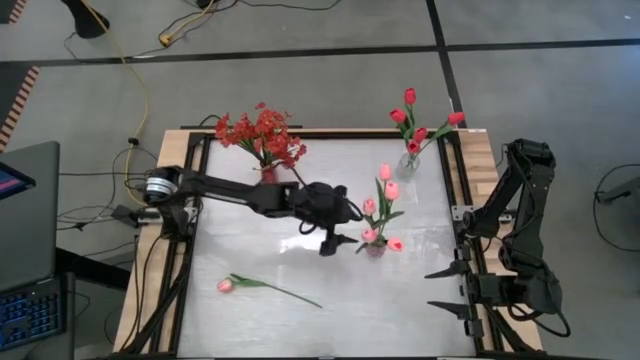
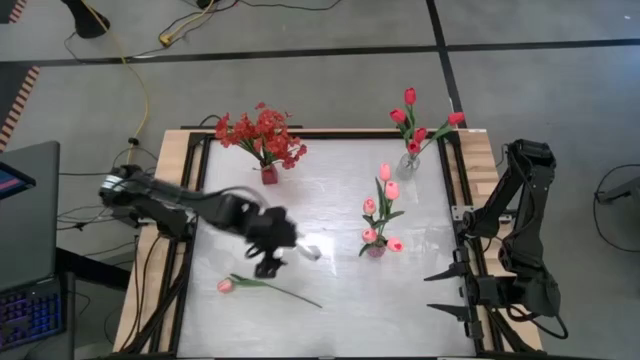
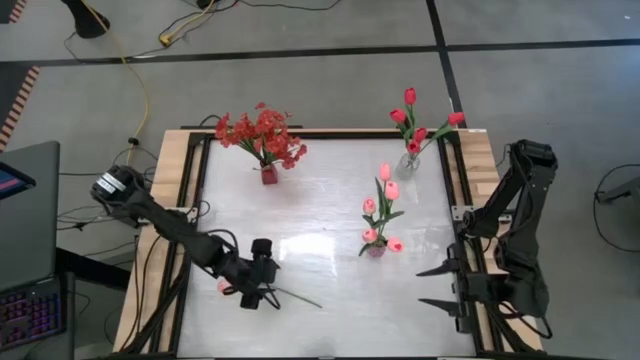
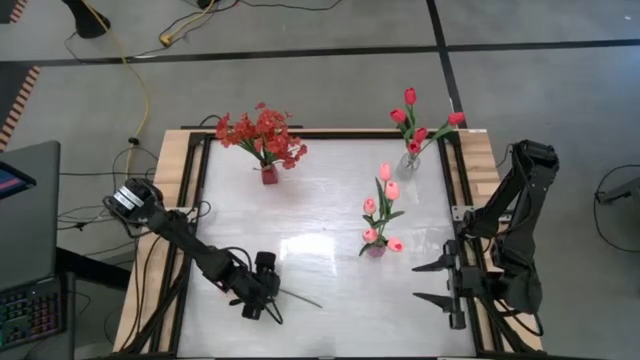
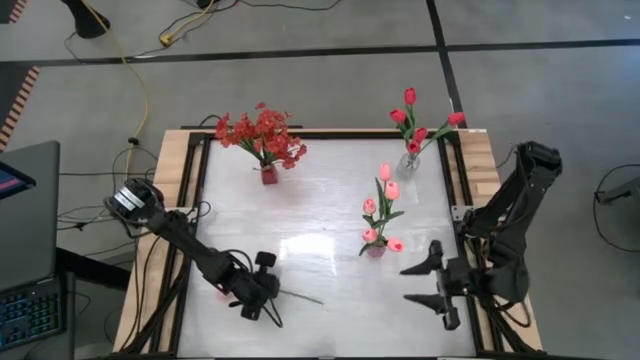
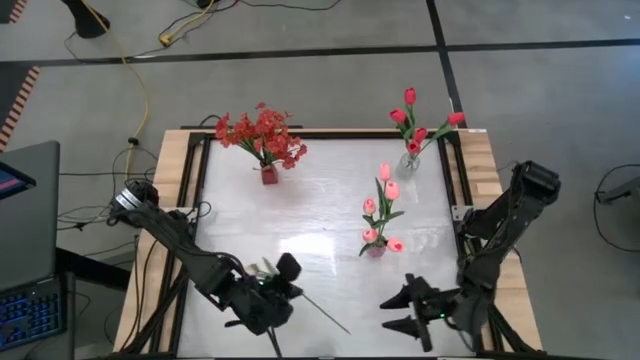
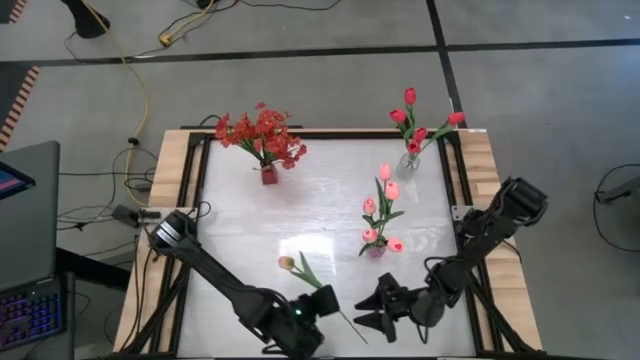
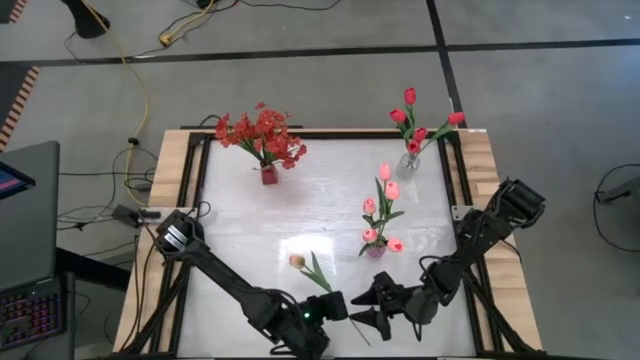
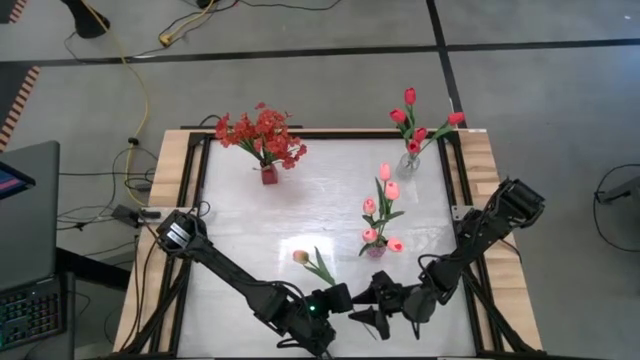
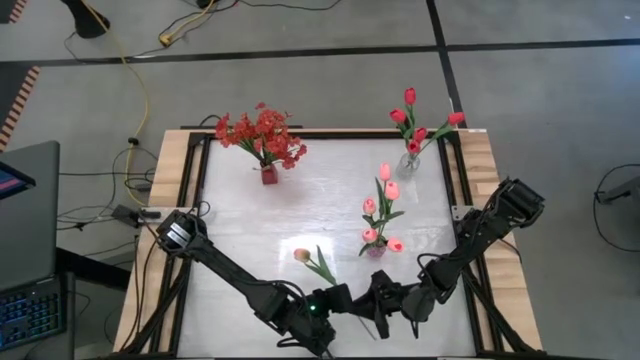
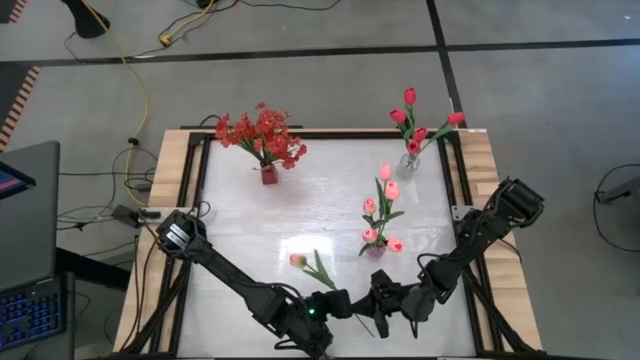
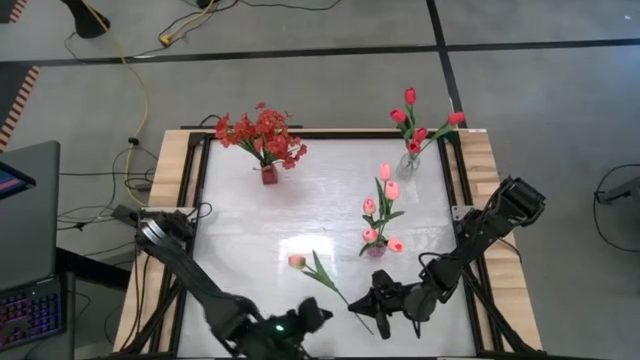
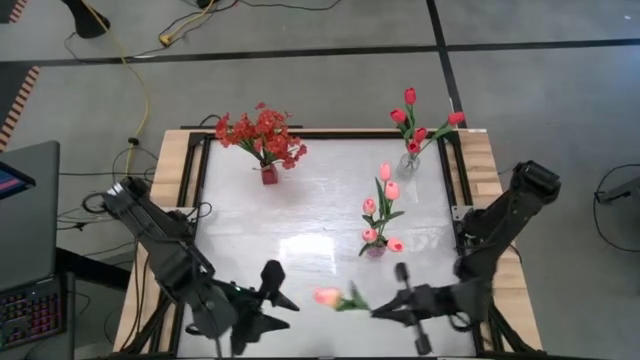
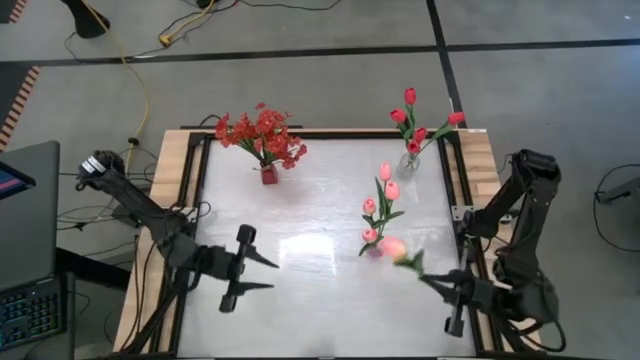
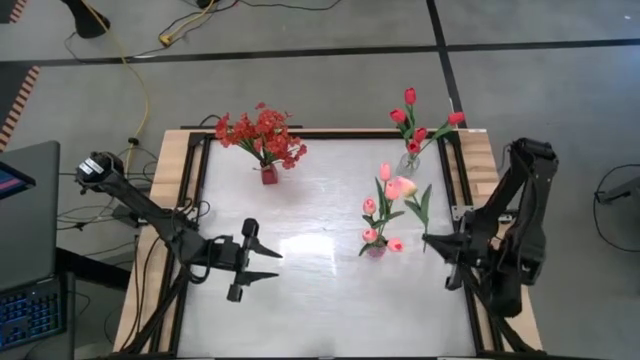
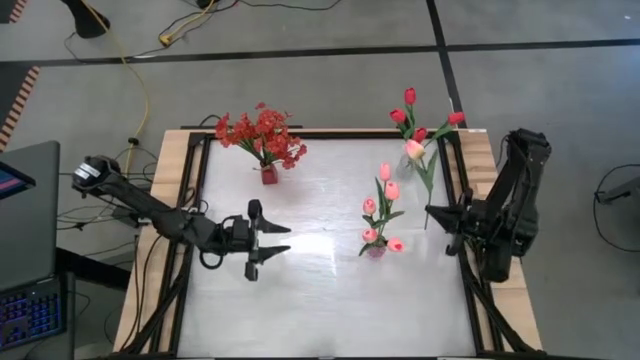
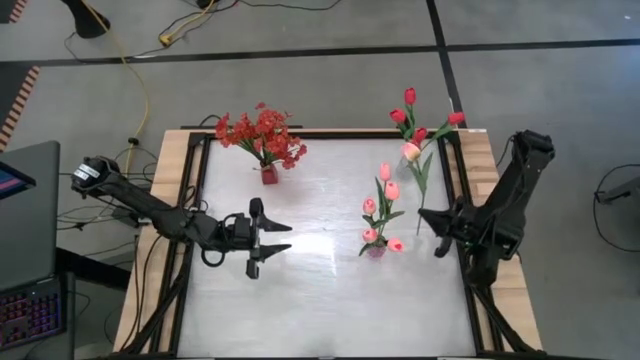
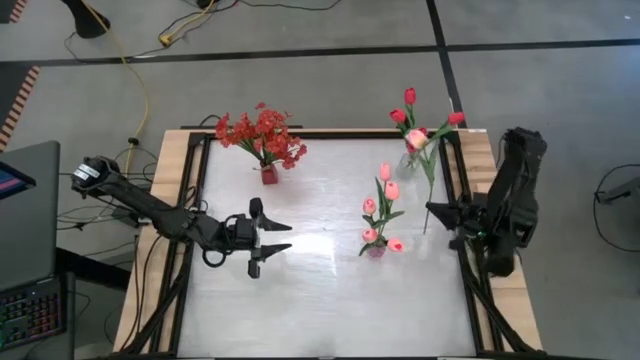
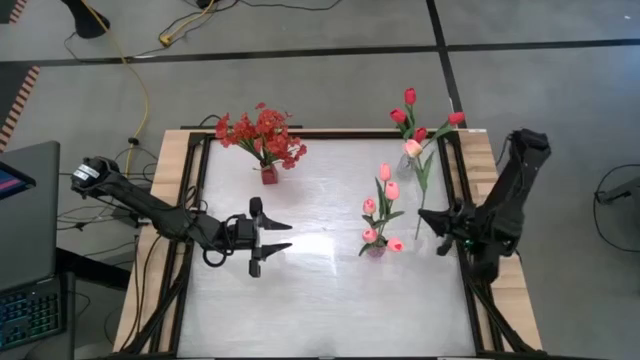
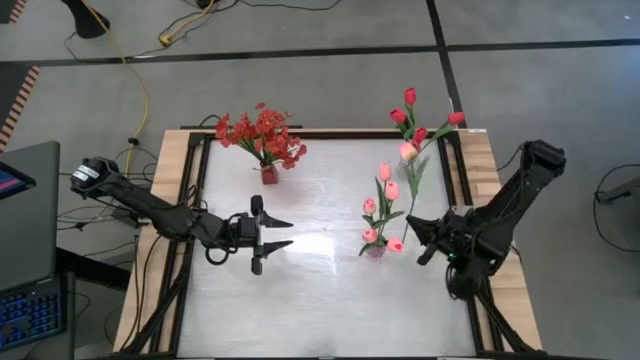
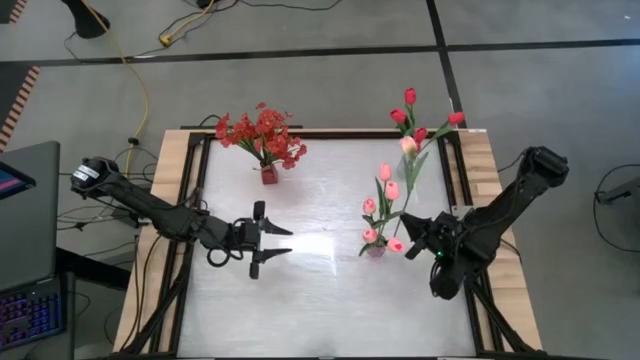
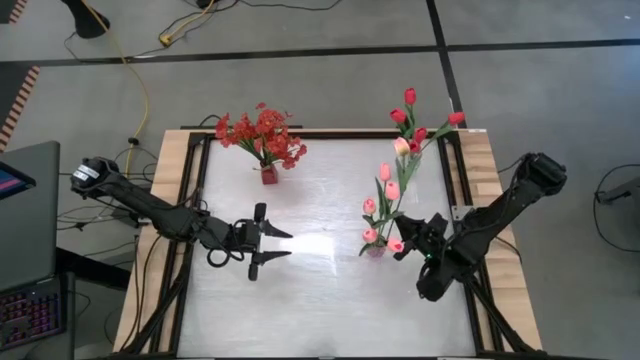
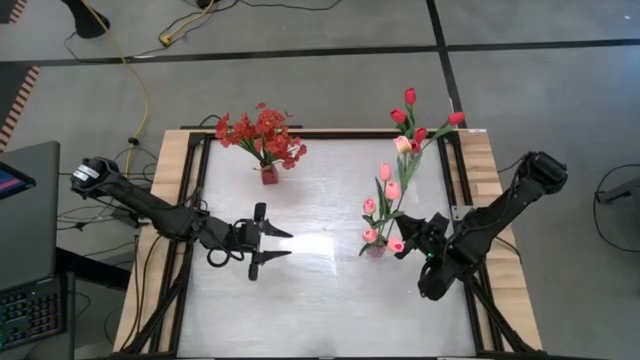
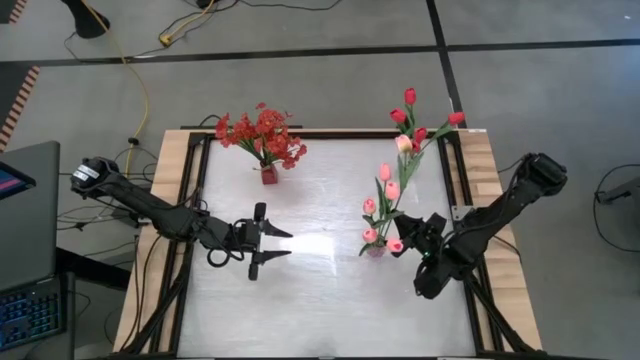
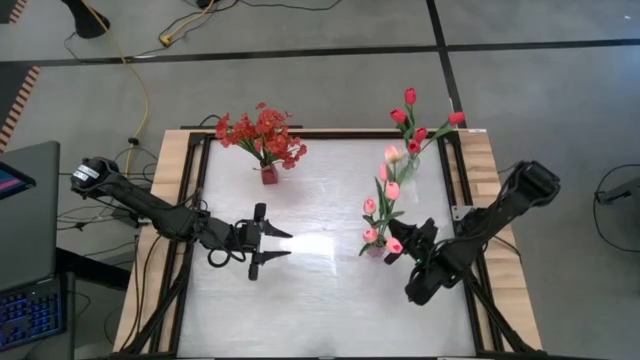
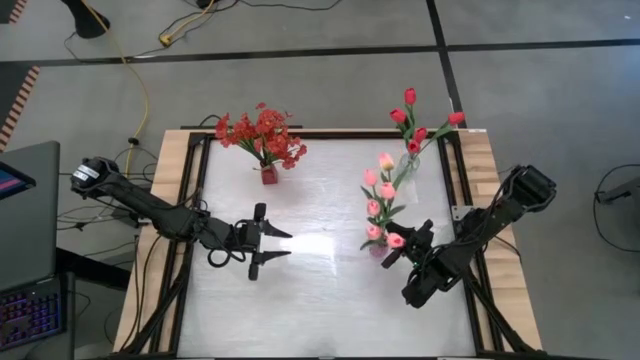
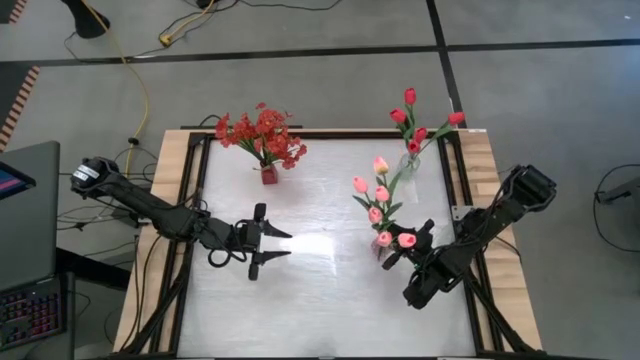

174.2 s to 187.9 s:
Task: Sort flowers into vase by color
Put the pink tulip into the purple flower vase

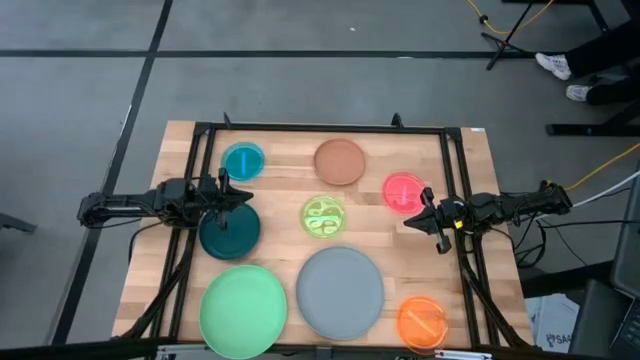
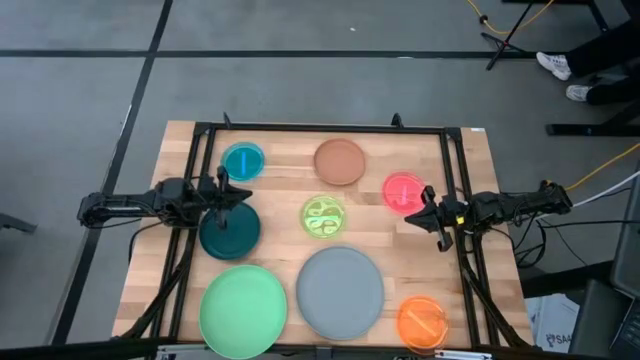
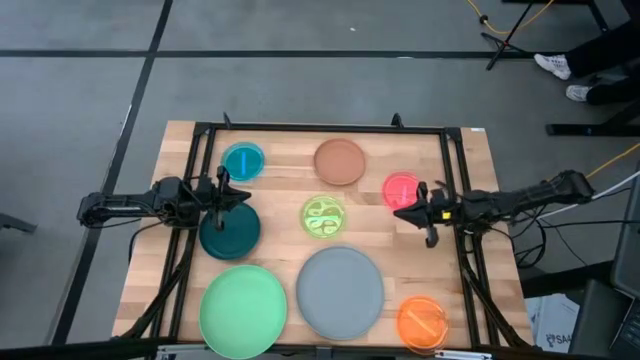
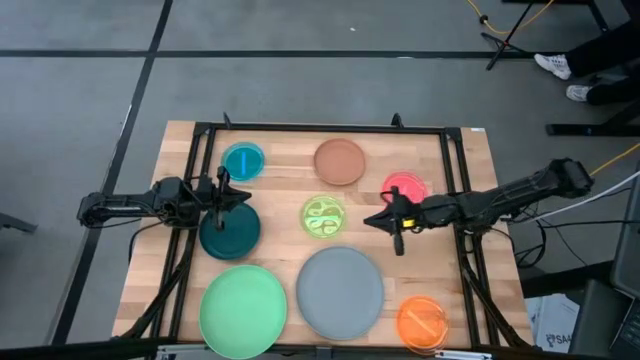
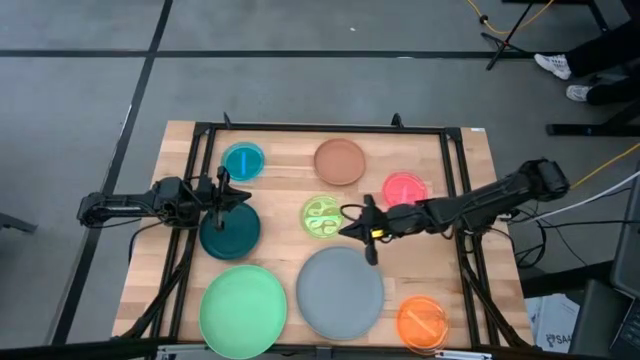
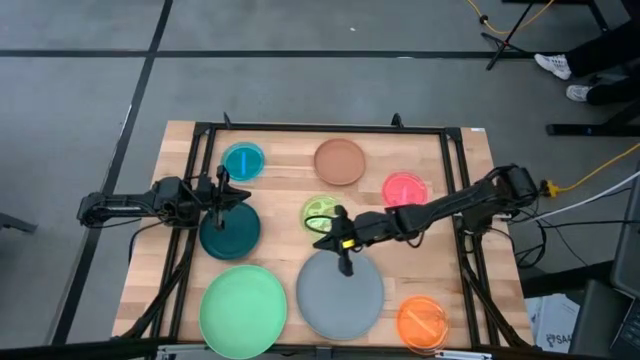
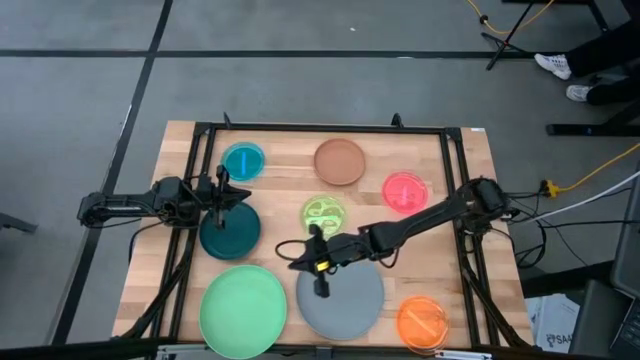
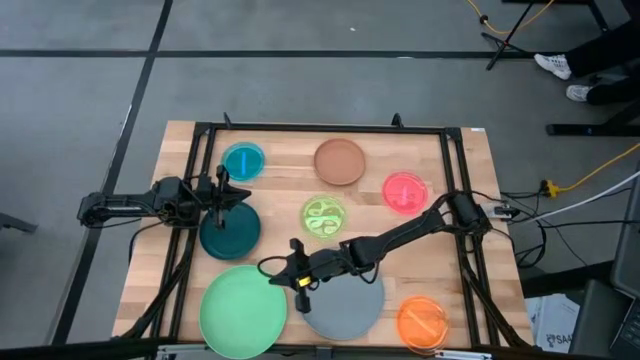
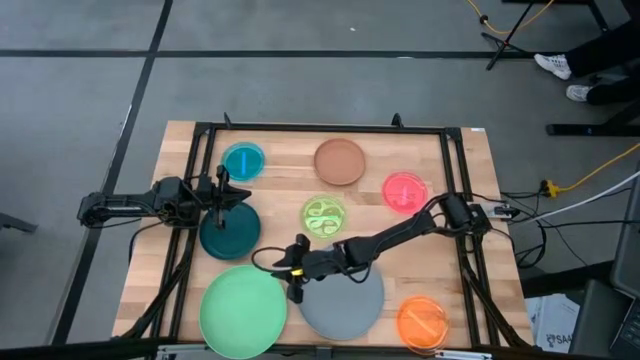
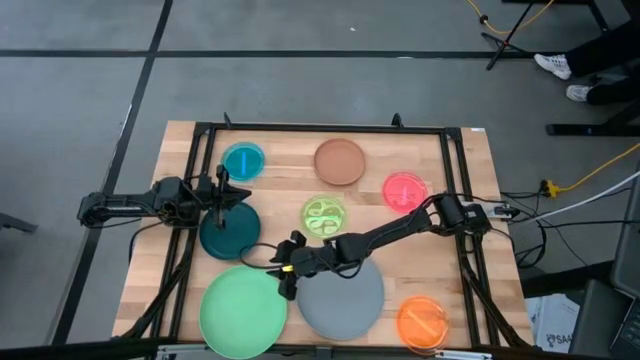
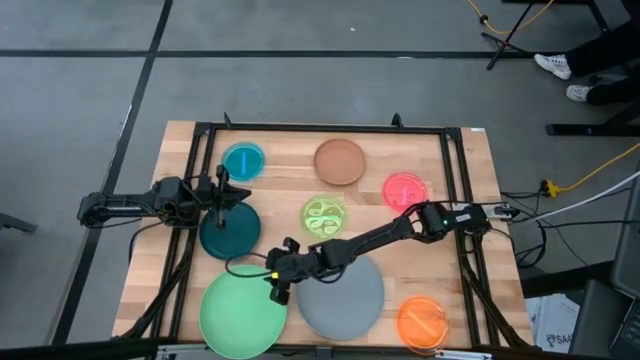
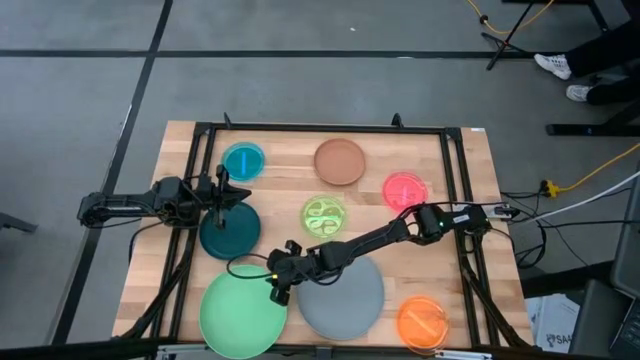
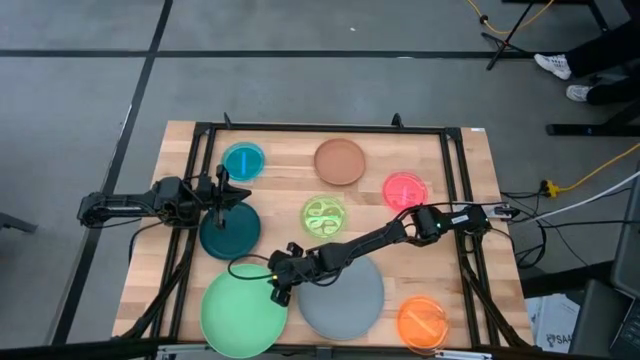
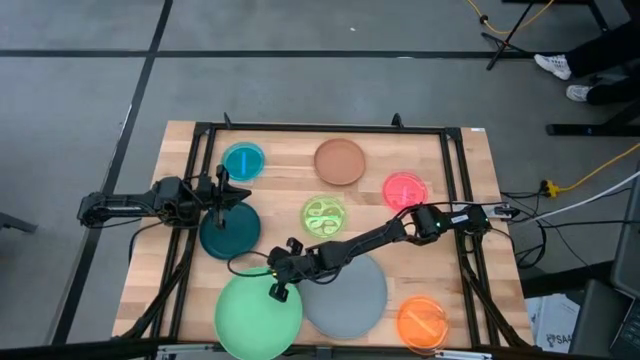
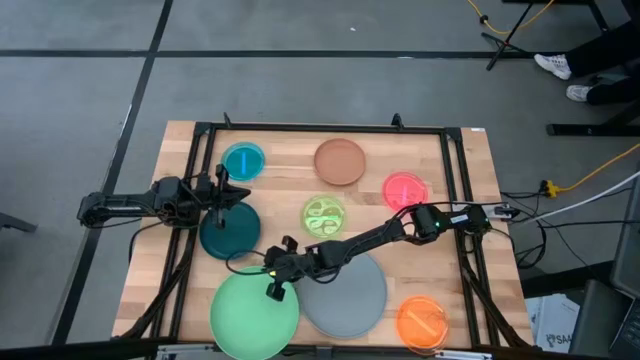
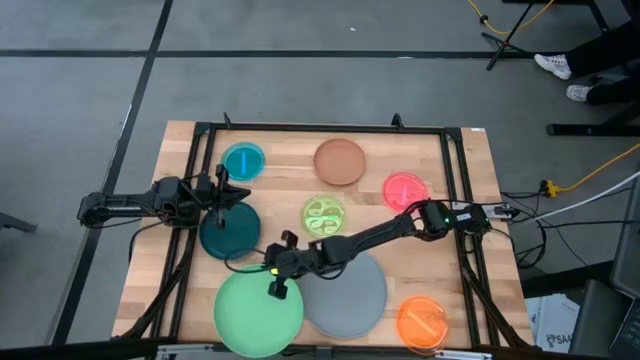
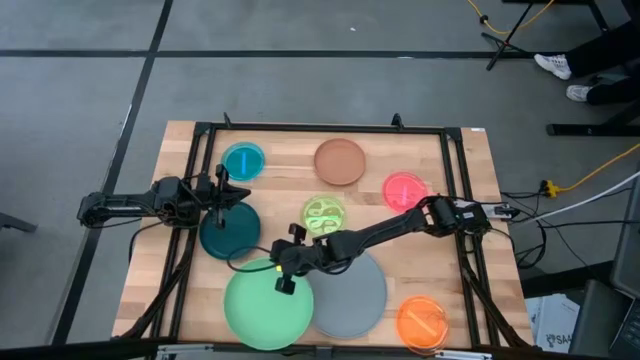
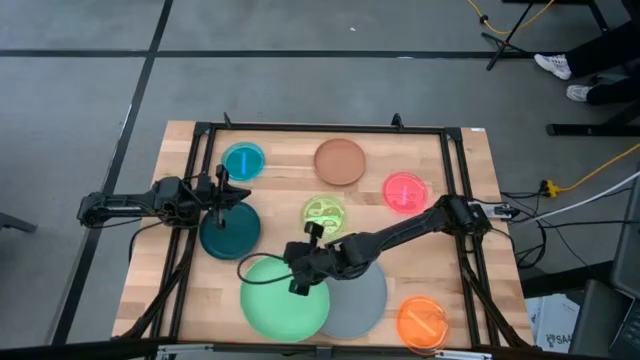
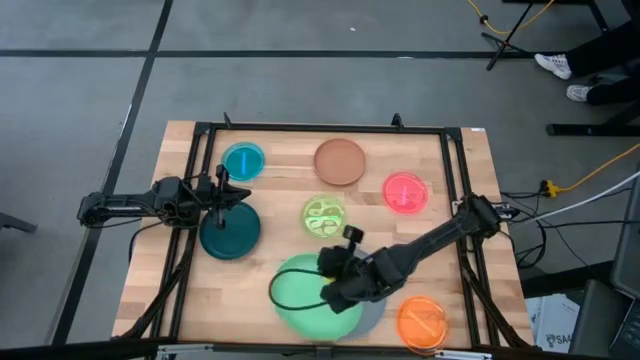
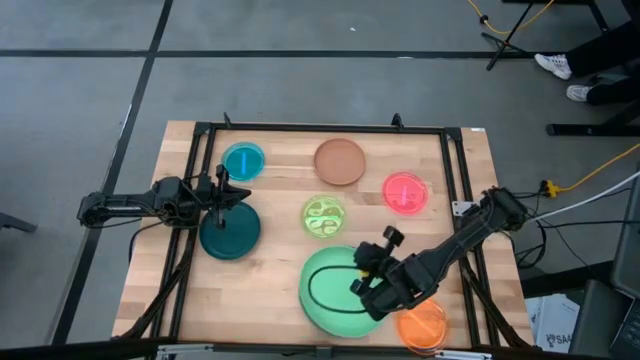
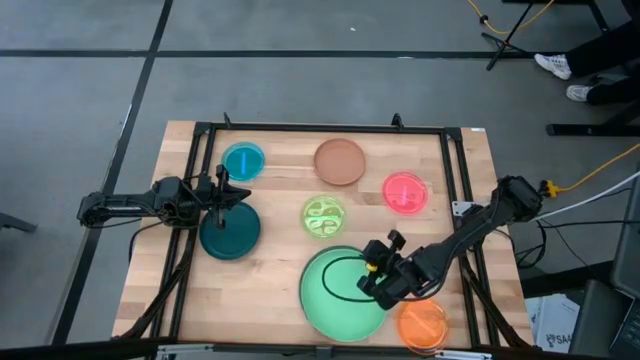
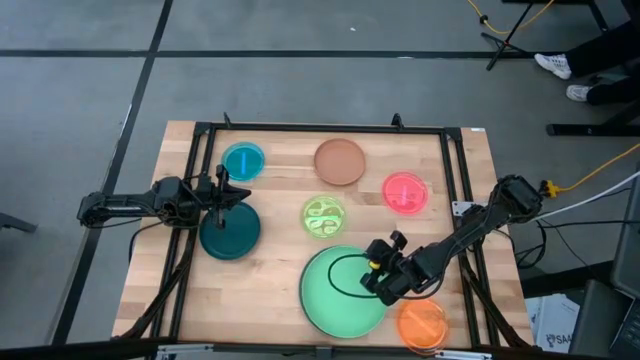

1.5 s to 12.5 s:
Task: Stack plastic plates
Stack the light green plate on top of the gray plate
